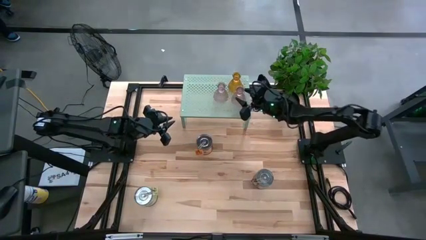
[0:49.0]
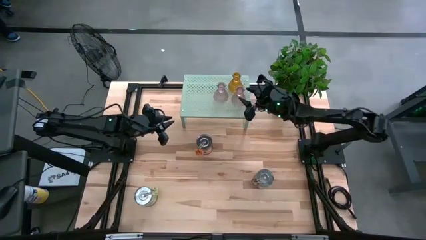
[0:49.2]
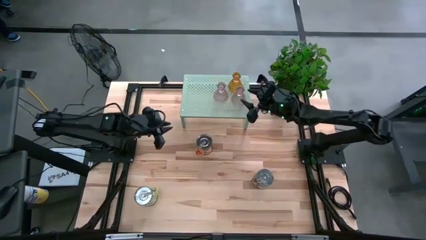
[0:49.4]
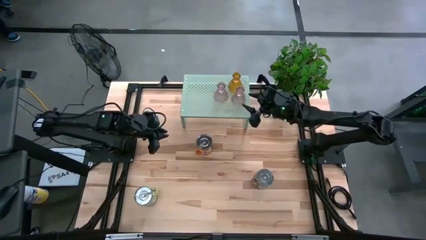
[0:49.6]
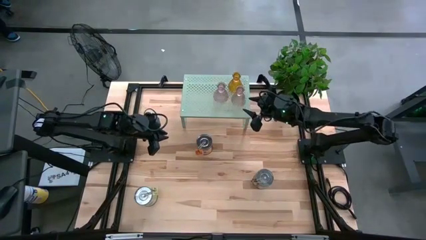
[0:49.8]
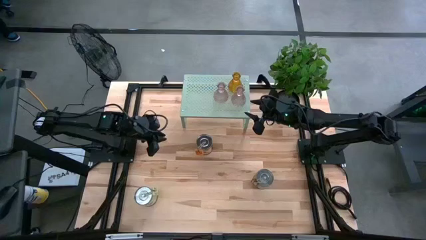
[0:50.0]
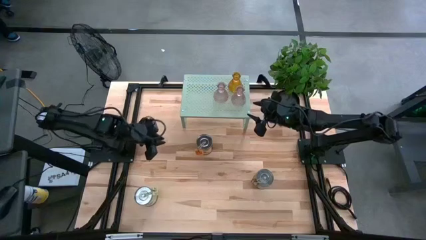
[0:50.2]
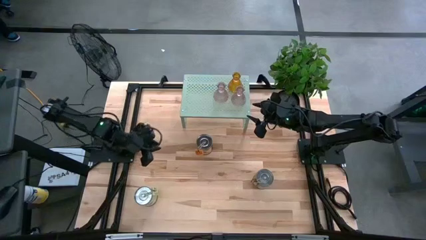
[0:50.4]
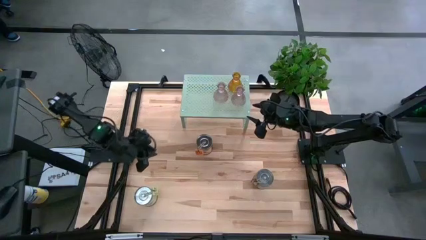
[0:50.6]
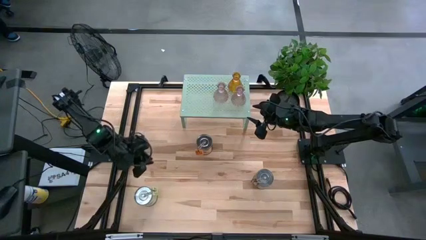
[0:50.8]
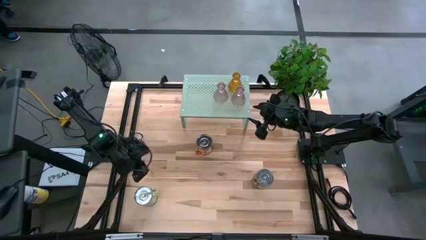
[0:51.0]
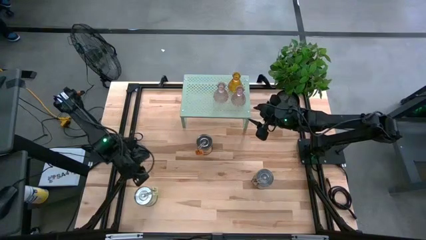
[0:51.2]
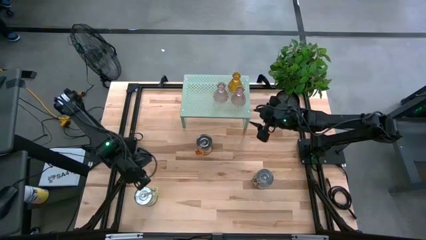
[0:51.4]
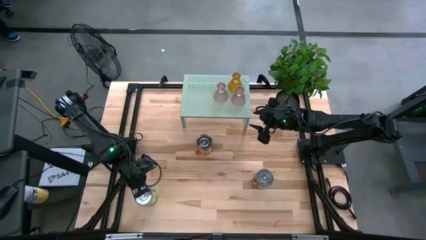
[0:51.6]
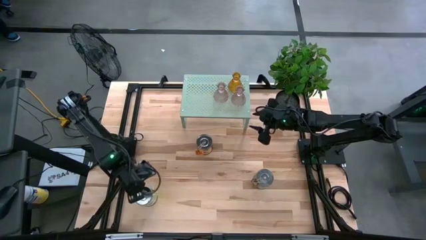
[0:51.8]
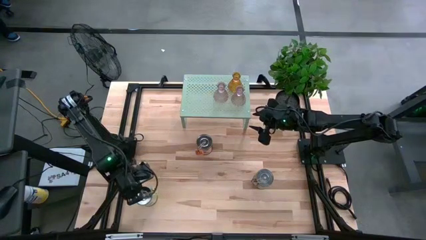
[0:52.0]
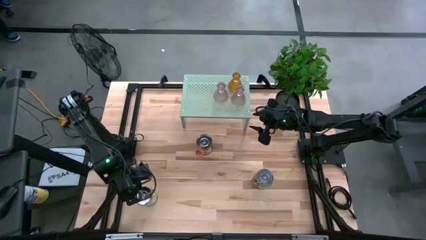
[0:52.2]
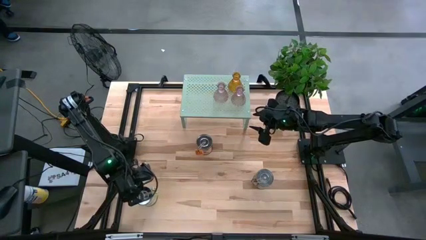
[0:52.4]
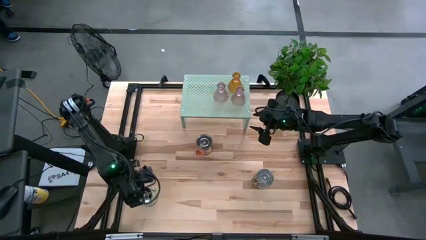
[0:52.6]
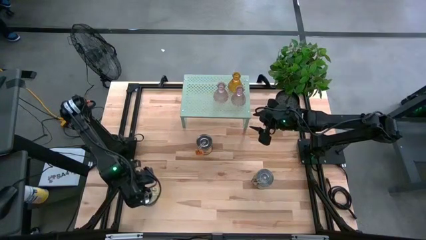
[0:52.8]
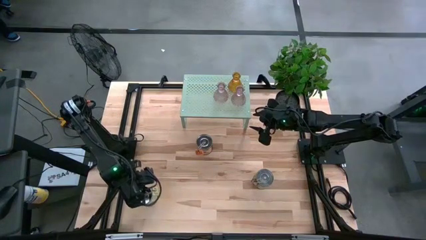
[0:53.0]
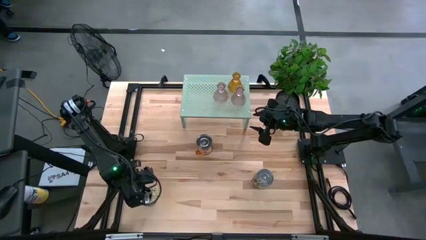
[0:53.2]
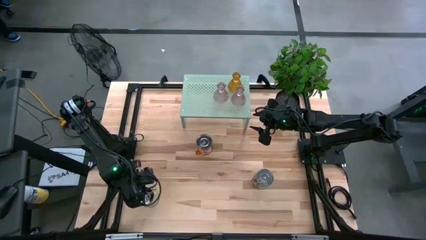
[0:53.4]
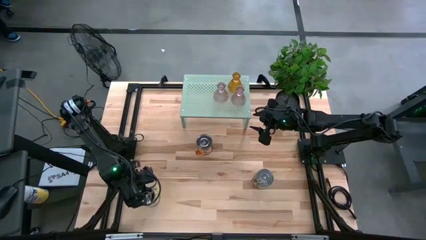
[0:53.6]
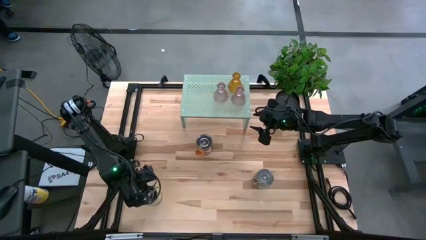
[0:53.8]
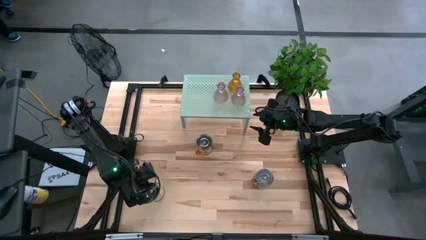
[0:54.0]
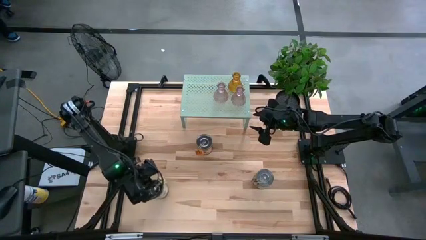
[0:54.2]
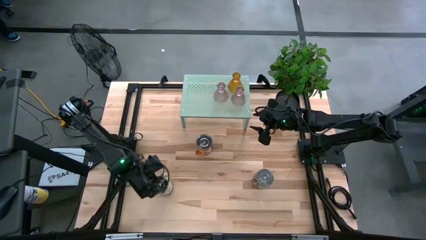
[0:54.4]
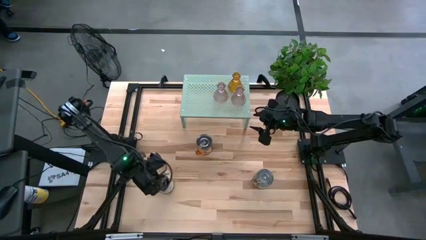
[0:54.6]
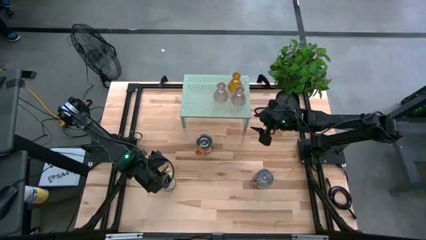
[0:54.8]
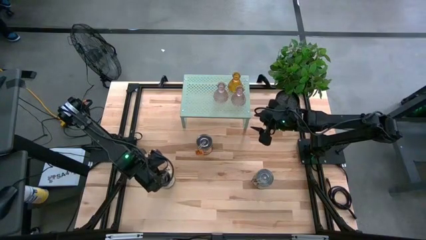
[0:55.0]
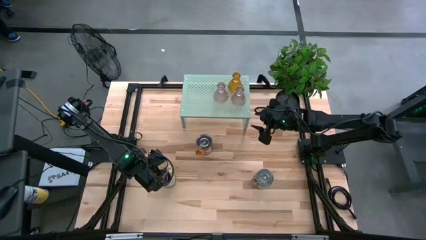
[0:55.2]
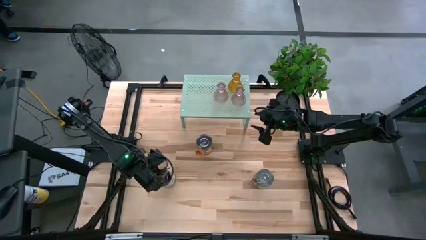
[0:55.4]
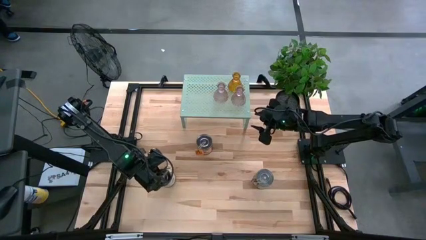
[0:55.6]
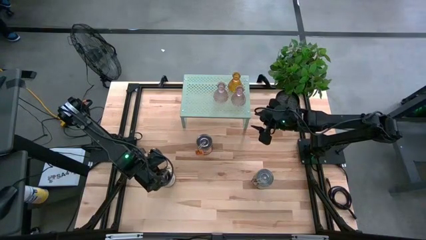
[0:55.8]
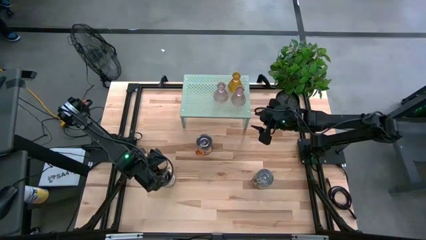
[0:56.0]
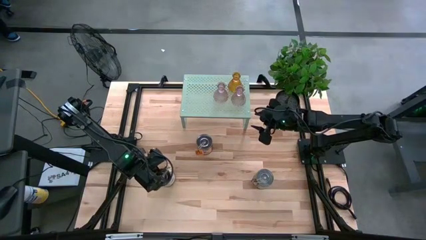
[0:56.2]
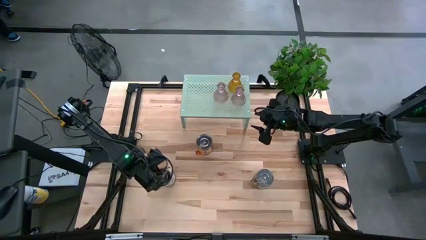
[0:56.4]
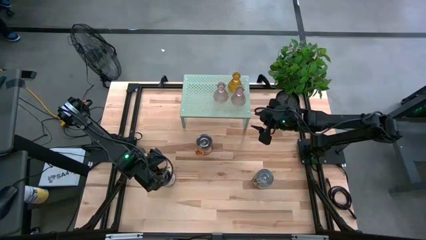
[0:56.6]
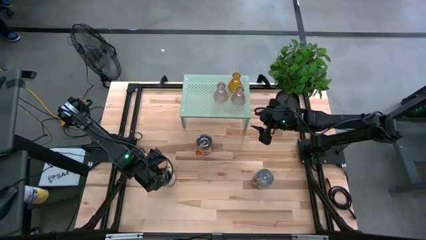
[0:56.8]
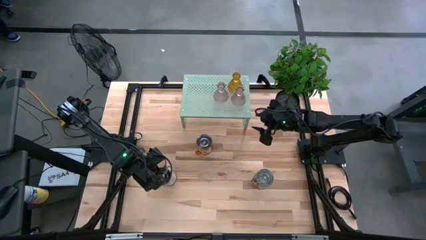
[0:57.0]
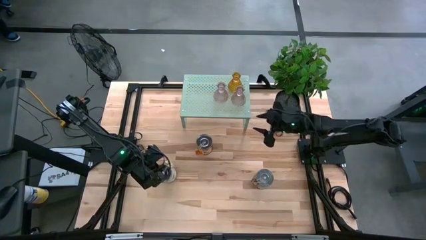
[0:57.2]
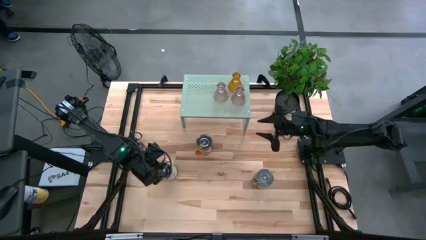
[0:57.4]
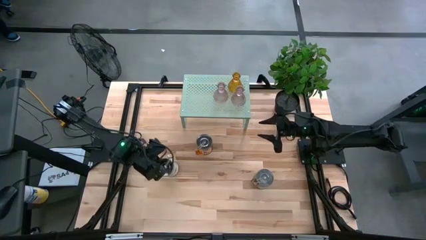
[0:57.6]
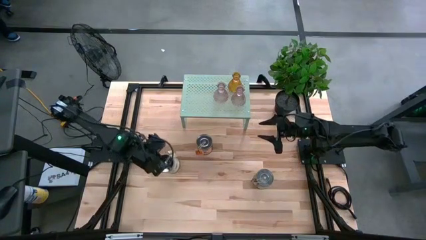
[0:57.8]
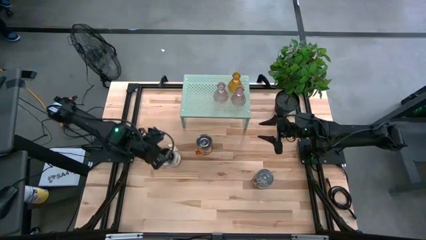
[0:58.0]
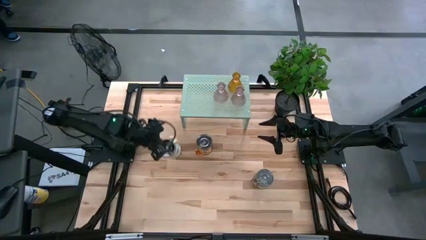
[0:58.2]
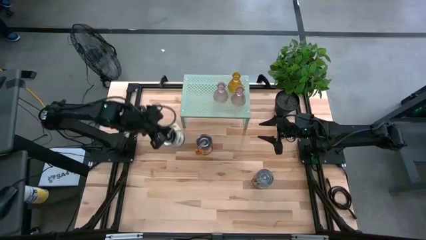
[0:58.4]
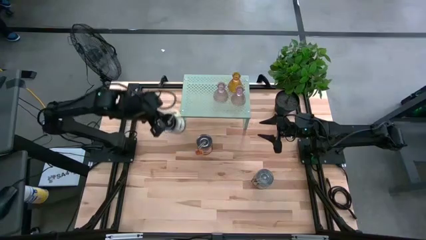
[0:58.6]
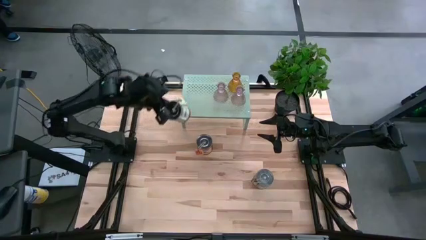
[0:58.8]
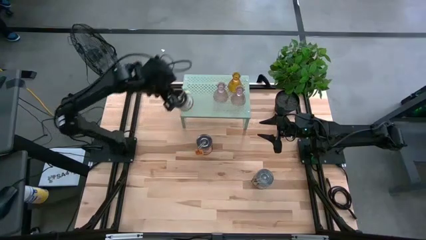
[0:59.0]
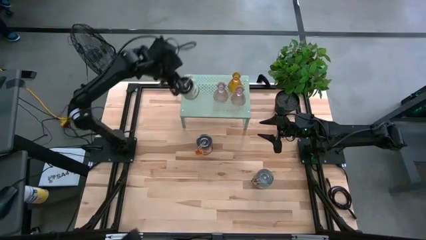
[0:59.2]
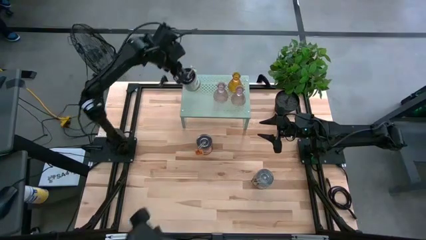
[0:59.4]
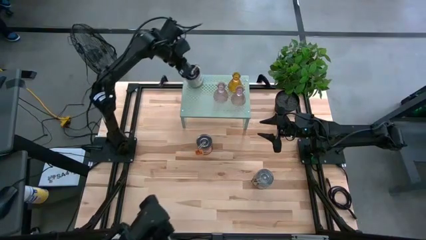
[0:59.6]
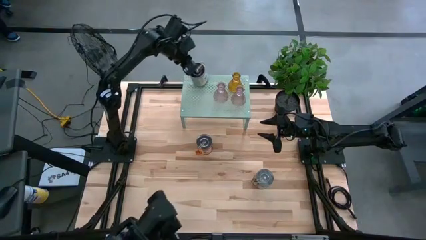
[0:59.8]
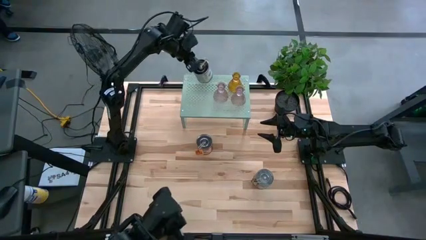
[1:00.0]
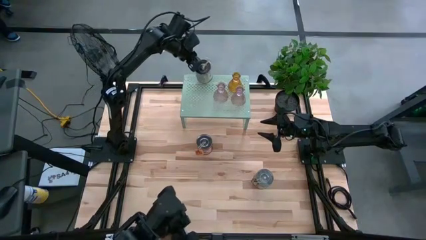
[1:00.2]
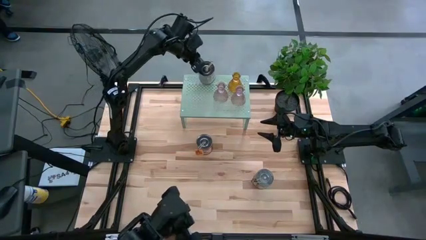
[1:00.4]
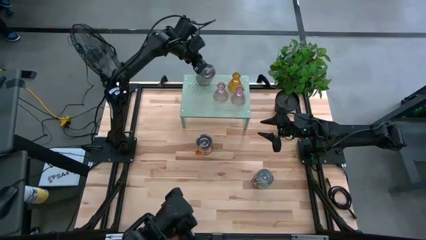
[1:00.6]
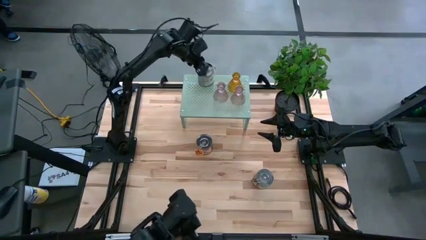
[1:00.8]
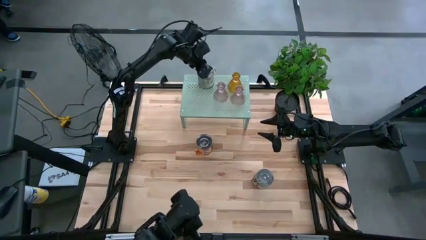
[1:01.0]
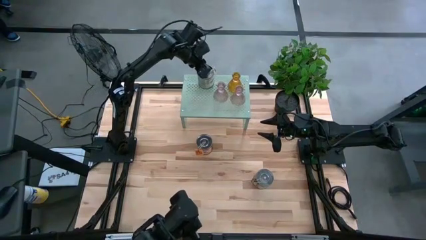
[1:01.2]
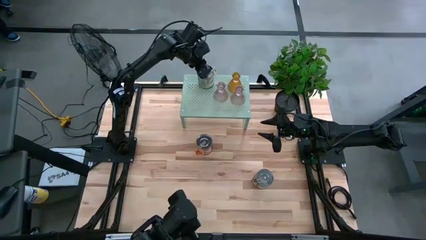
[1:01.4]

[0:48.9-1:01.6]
Task: Pick & Place candle stick holders
Put the green scented candle on the shelf
